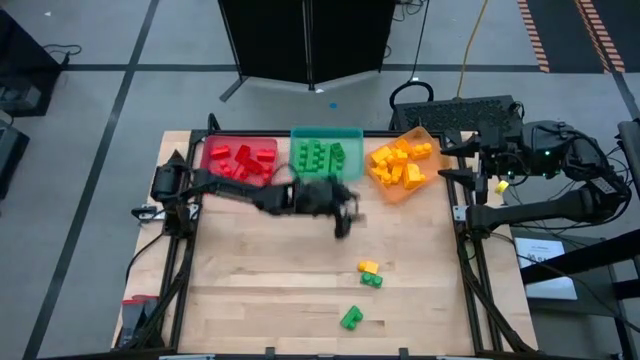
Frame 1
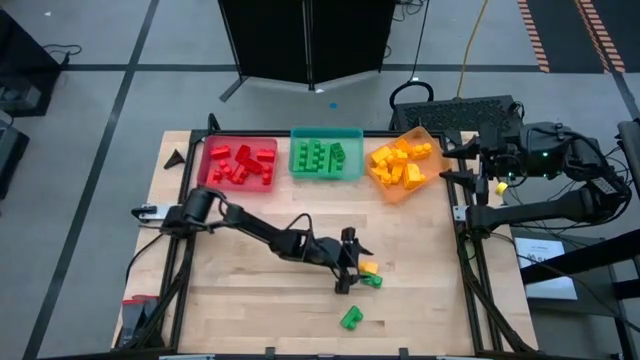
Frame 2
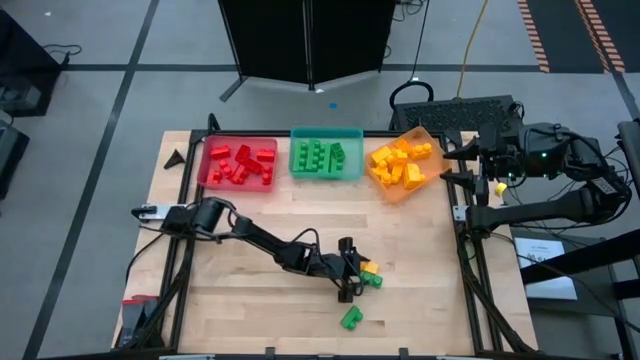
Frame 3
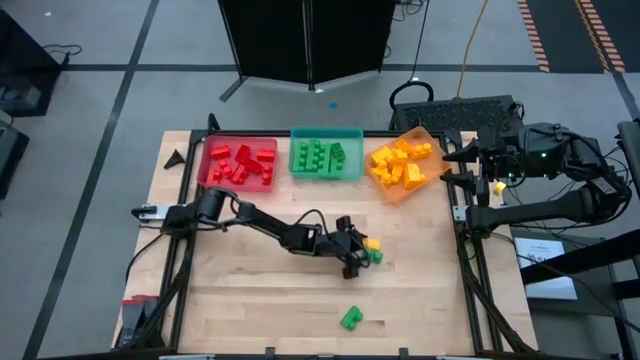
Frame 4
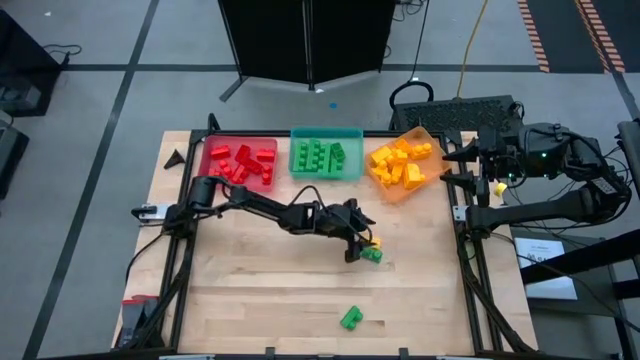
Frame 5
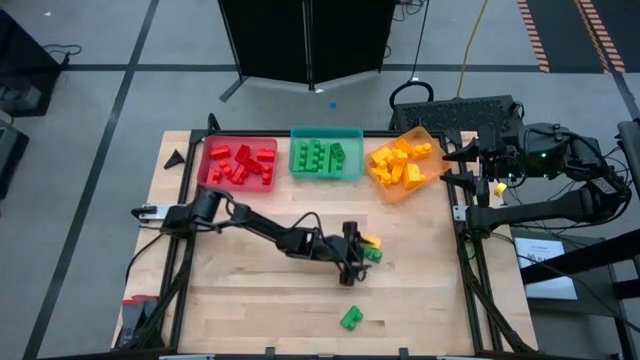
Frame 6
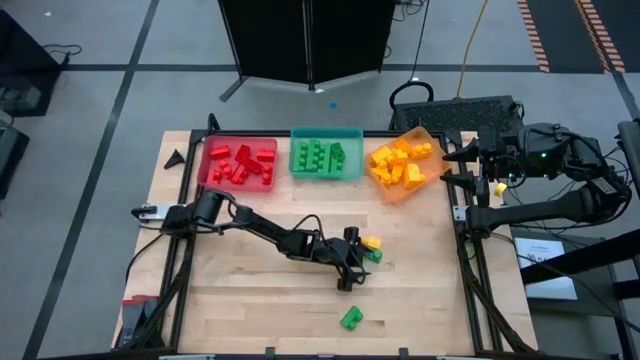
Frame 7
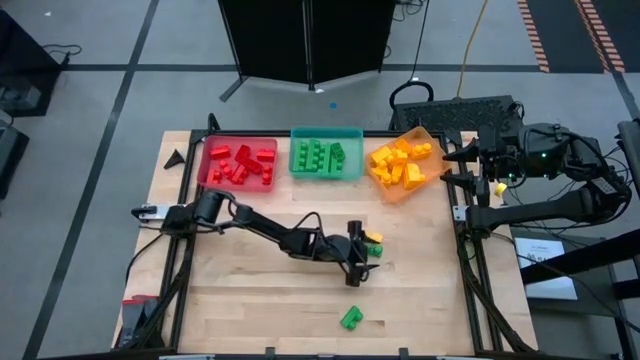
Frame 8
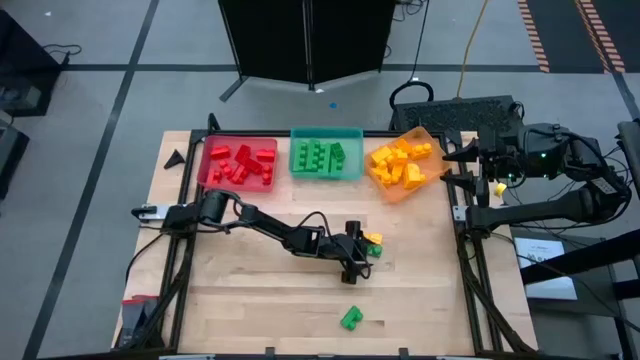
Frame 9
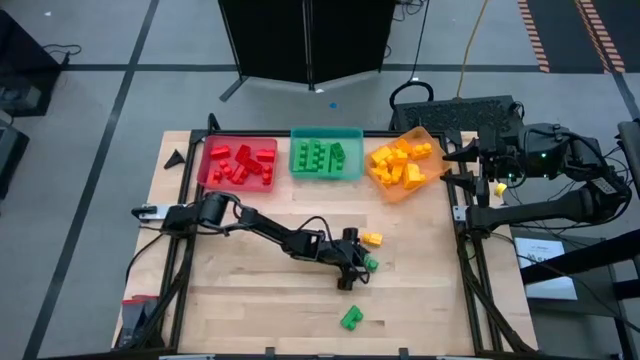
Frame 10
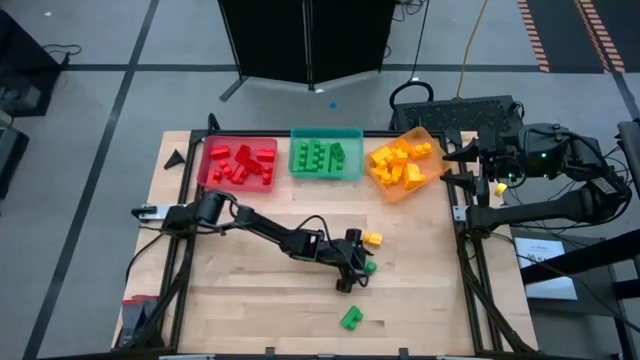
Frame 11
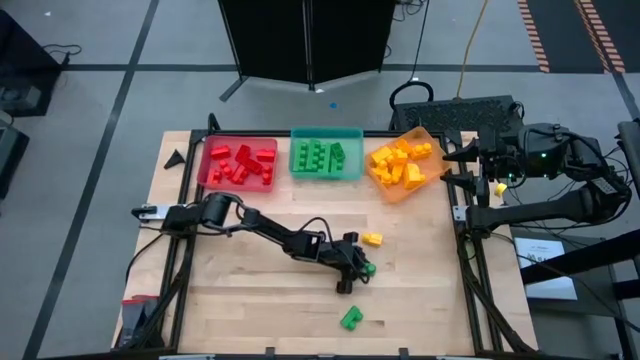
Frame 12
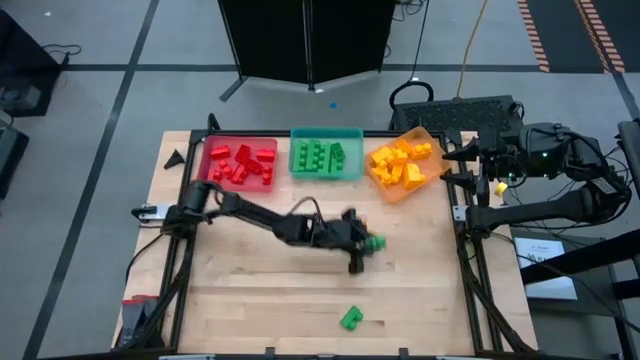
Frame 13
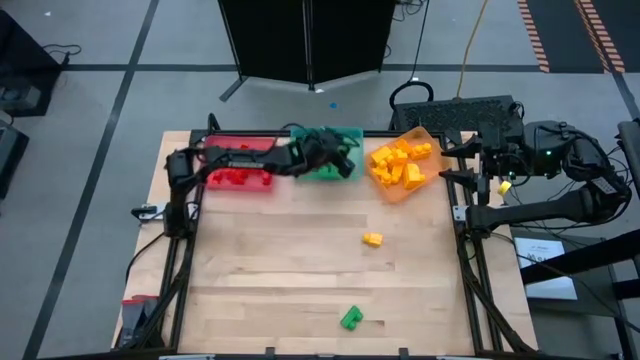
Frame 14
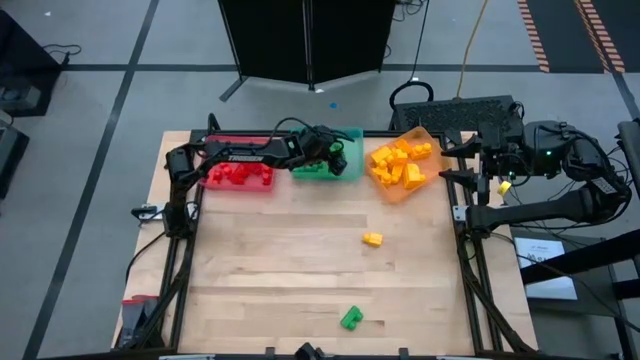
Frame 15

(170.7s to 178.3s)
Task: Sort blocks
Put the green game piece into the blue bin

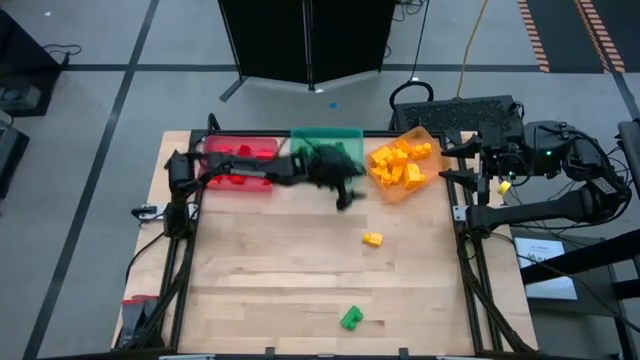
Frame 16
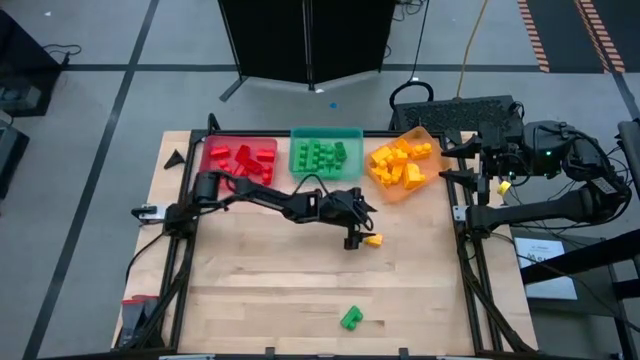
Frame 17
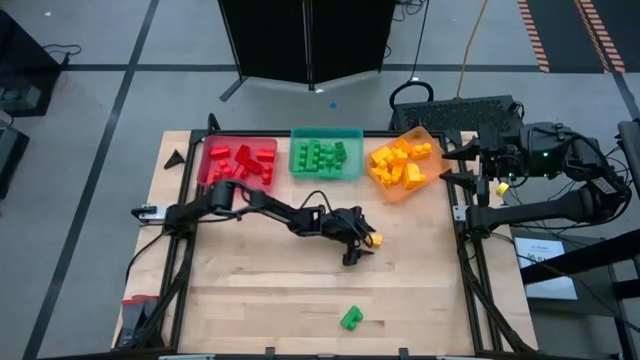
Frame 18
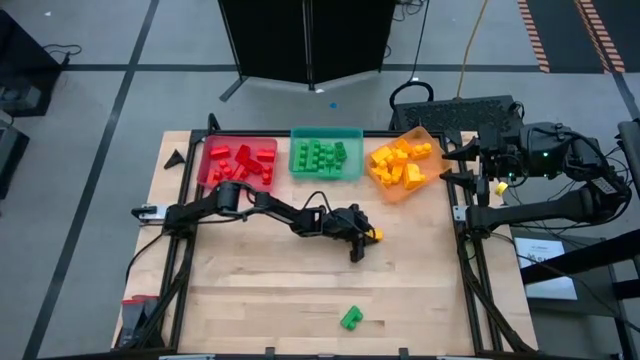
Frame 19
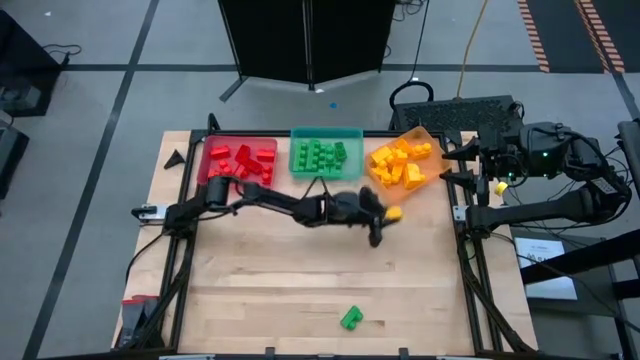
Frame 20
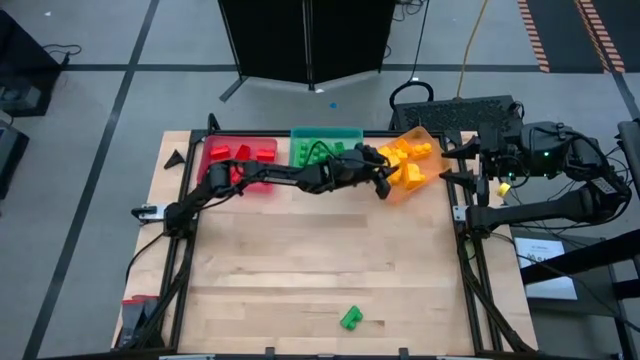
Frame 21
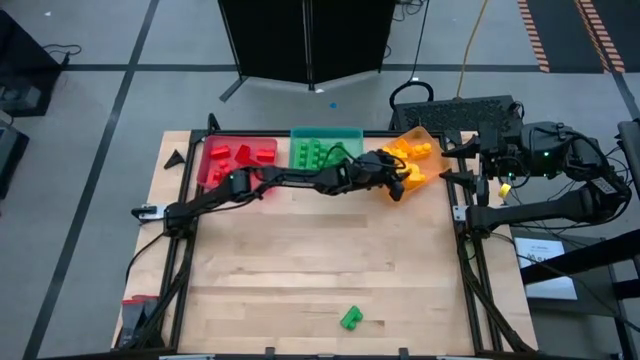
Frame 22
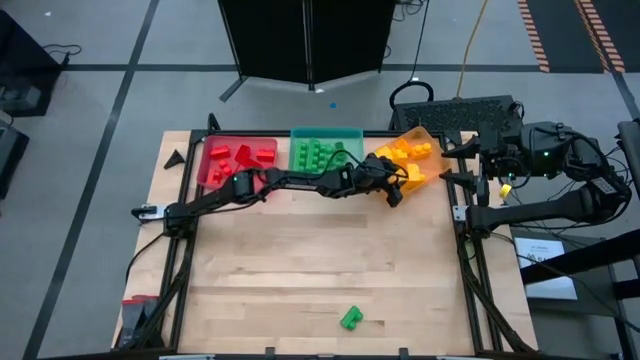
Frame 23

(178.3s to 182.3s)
Put the yellow game piece into the orange bin

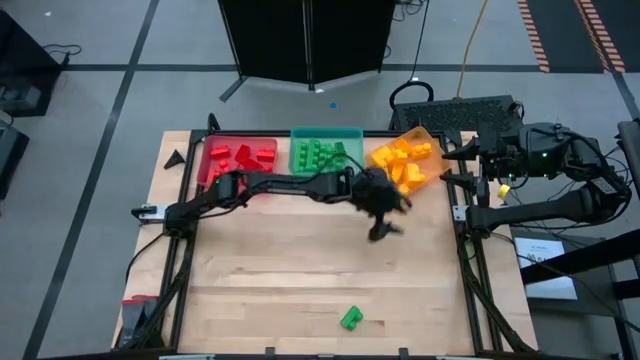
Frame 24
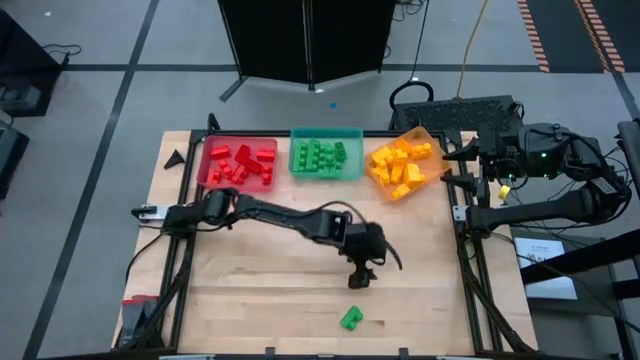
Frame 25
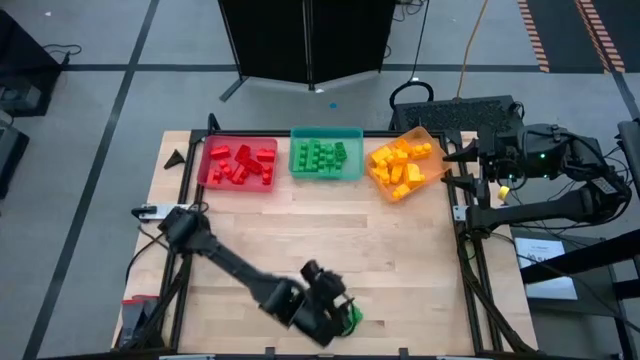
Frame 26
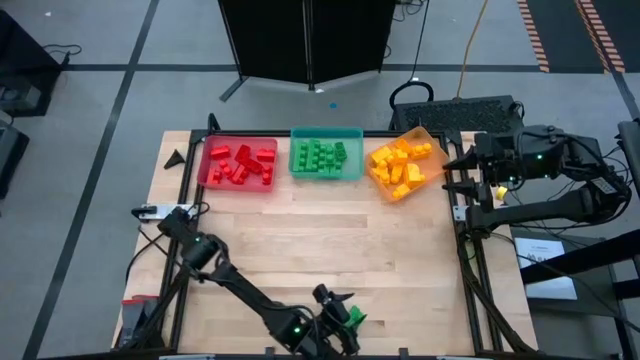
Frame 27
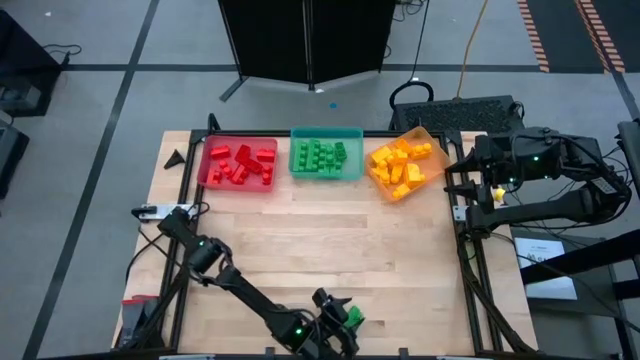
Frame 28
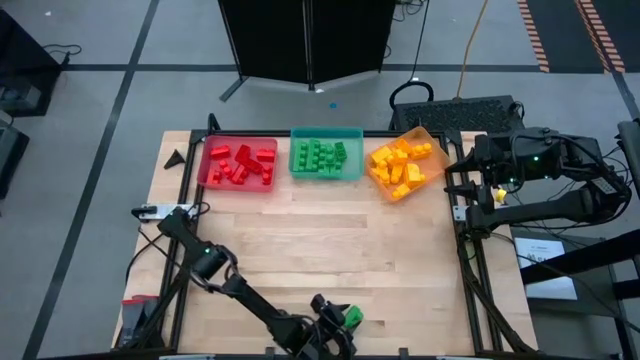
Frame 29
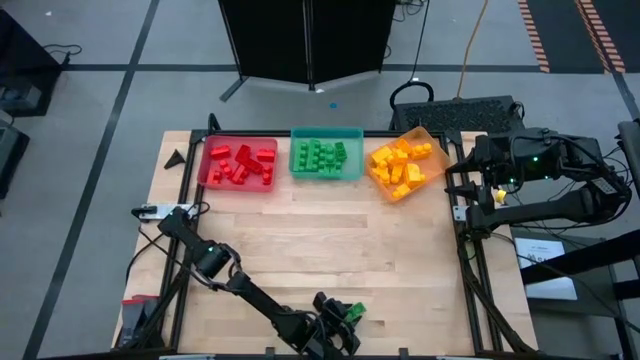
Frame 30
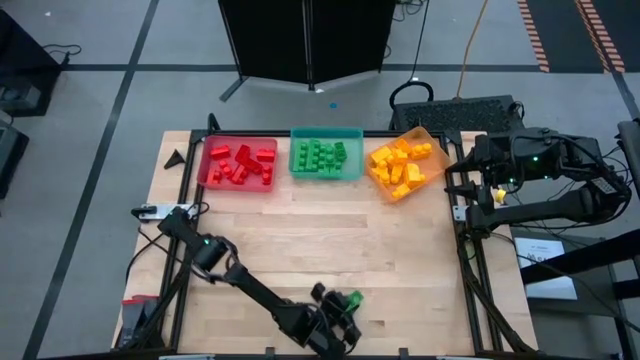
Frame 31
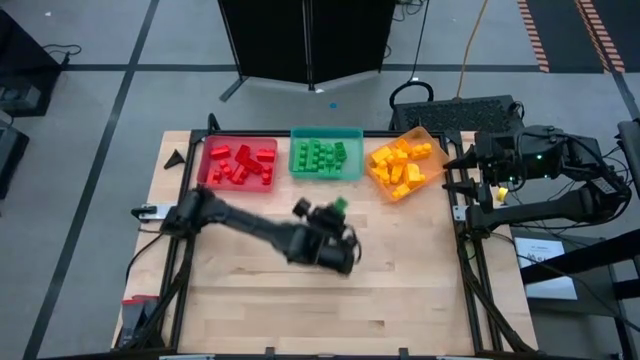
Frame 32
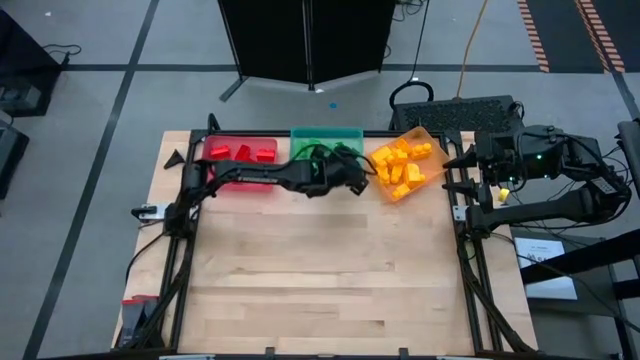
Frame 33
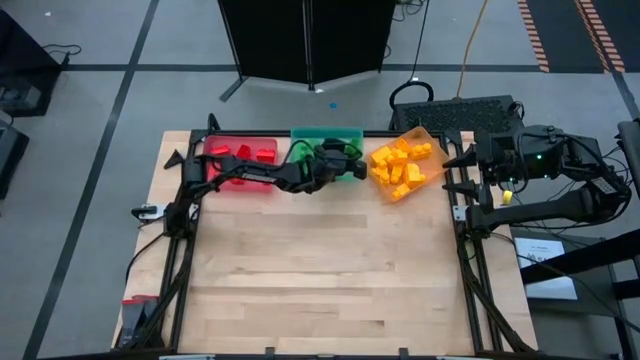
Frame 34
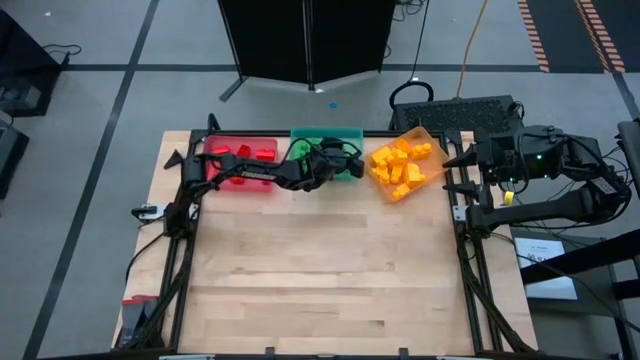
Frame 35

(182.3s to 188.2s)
Put the green game piece into the blue bin

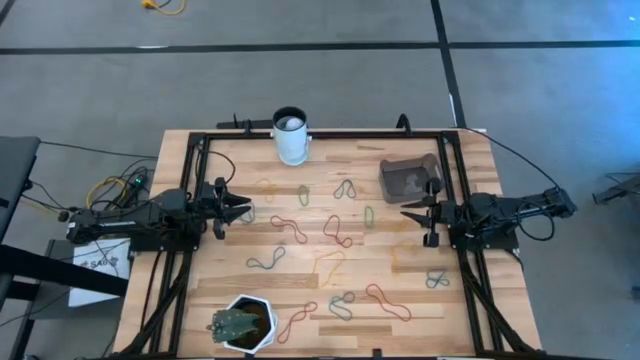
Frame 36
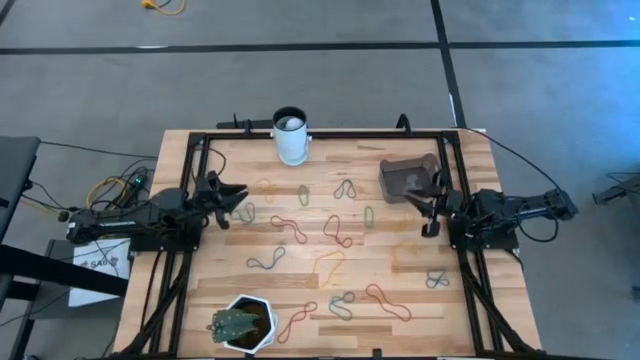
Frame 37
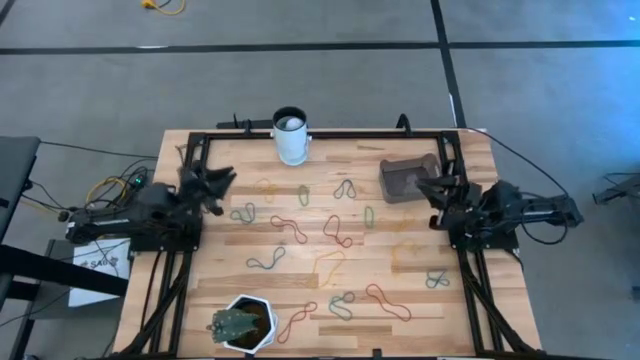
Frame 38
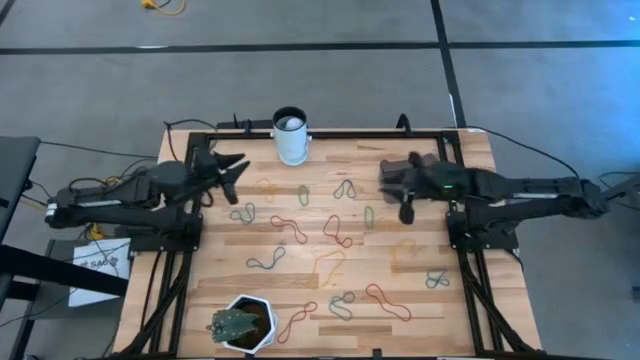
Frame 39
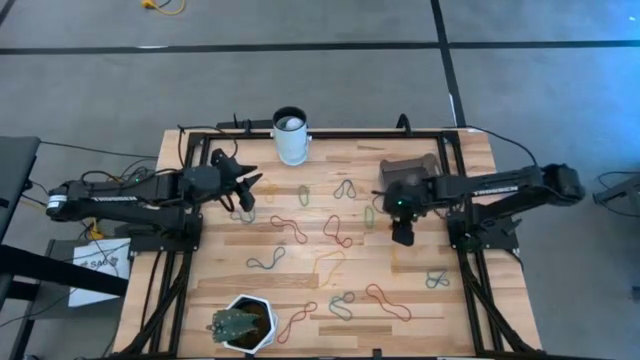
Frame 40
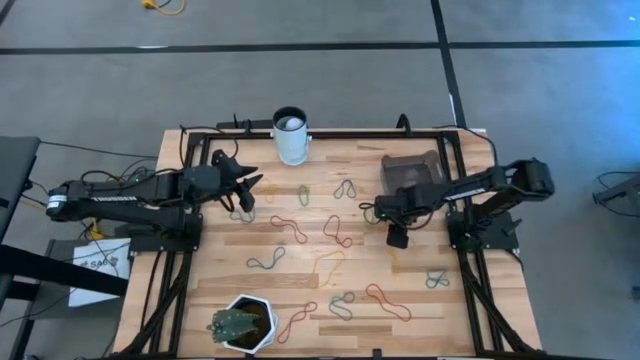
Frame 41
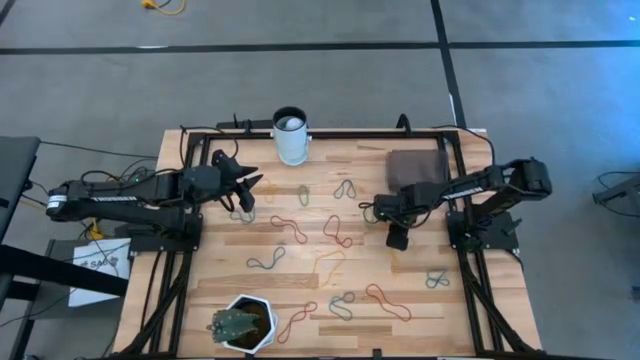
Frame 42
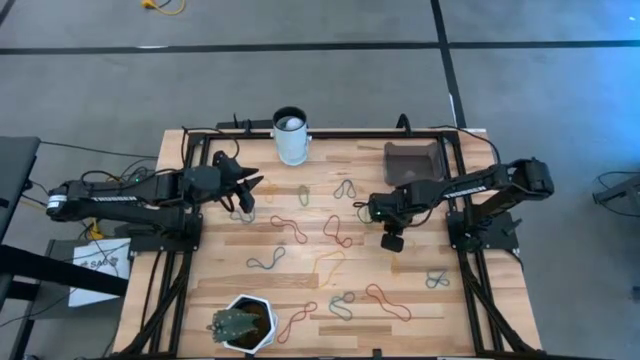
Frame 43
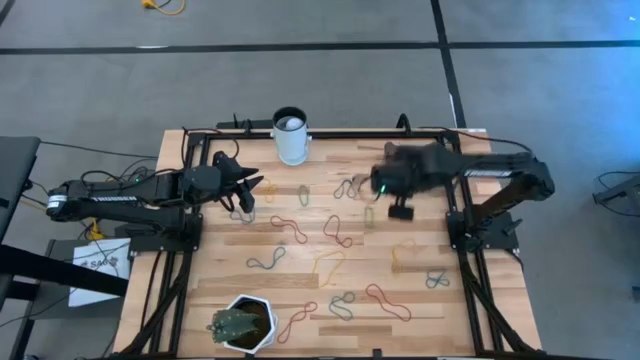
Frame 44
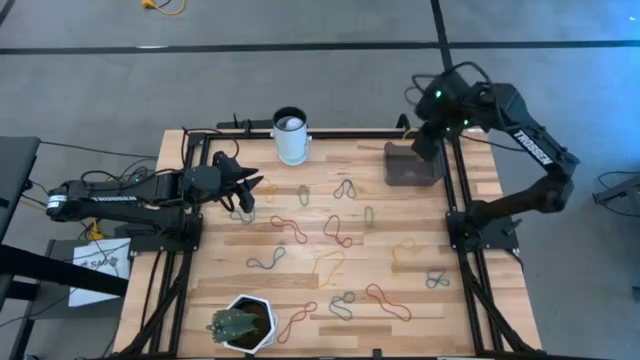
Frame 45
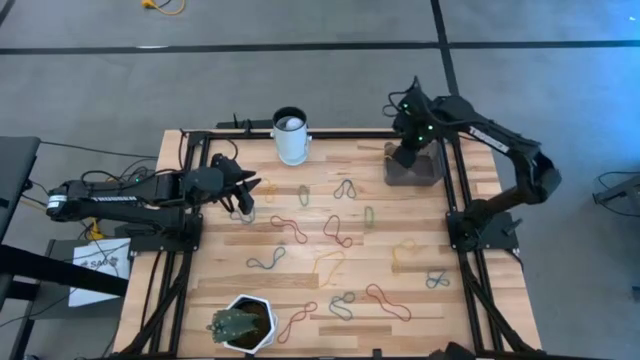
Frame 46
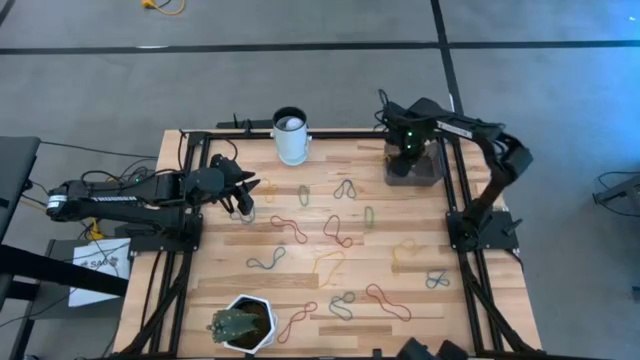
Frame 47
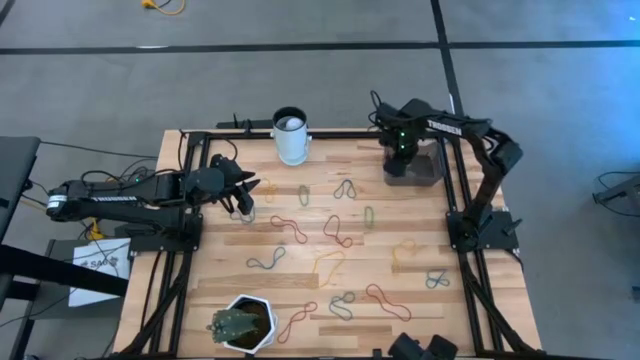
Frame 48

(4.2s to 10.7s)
Task: Pick and place items into bin
Put the yellow rubber band into the bin
